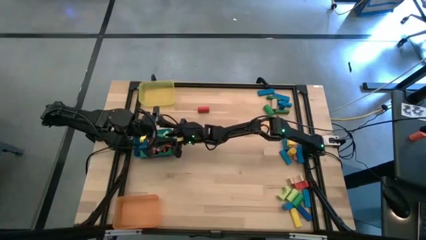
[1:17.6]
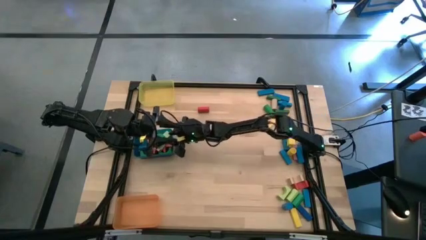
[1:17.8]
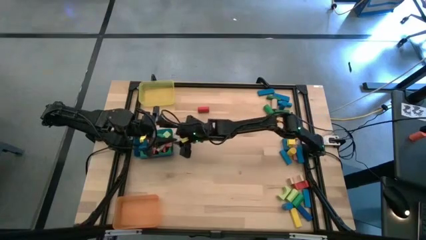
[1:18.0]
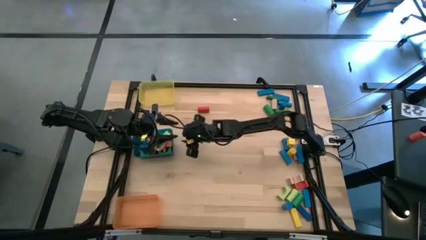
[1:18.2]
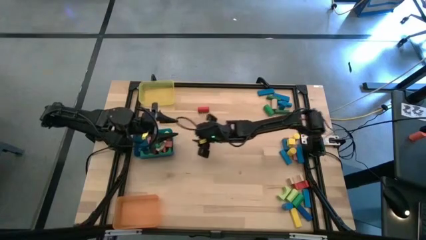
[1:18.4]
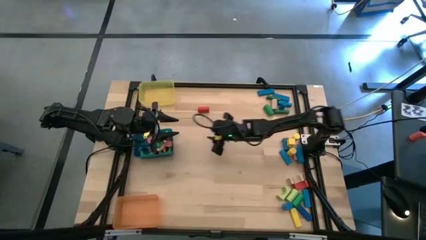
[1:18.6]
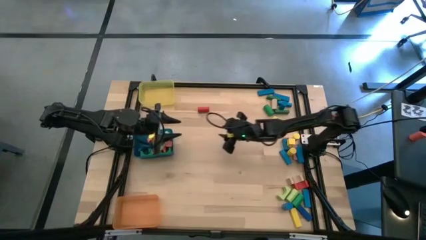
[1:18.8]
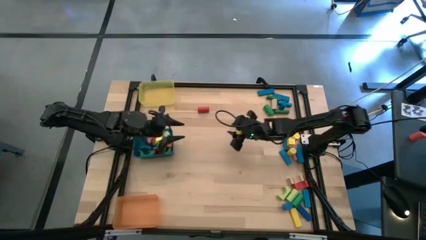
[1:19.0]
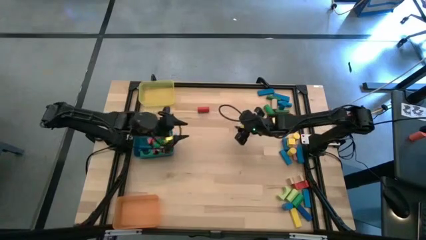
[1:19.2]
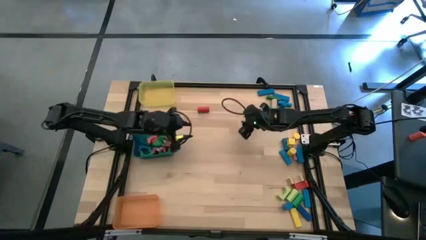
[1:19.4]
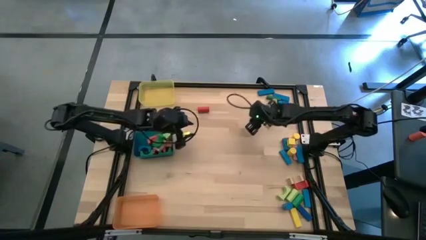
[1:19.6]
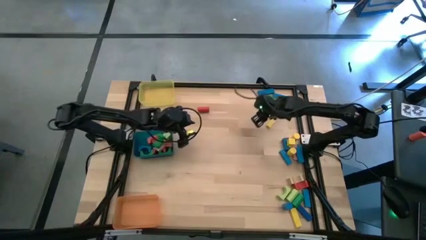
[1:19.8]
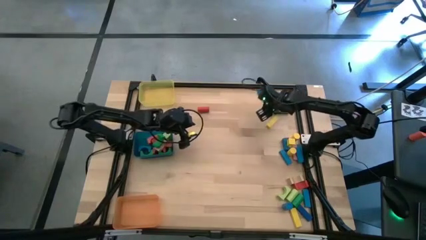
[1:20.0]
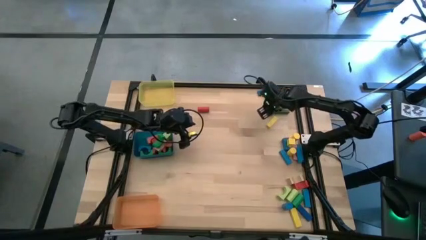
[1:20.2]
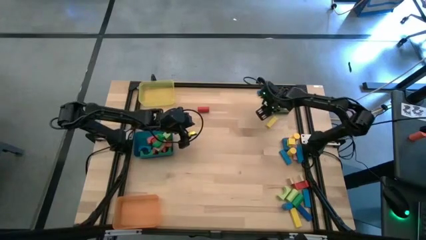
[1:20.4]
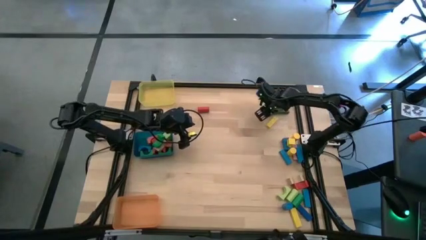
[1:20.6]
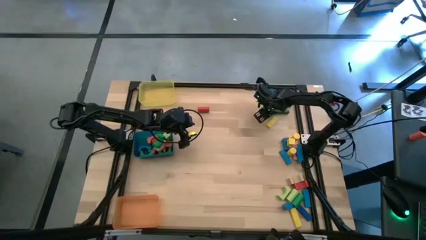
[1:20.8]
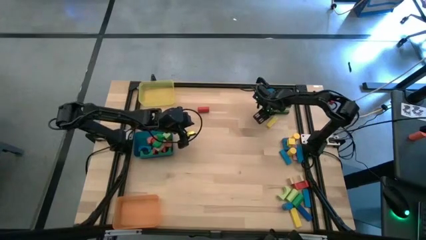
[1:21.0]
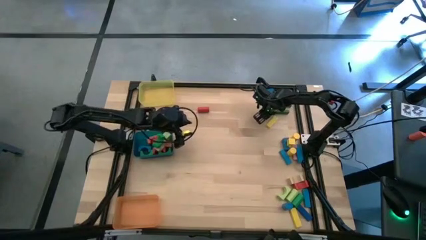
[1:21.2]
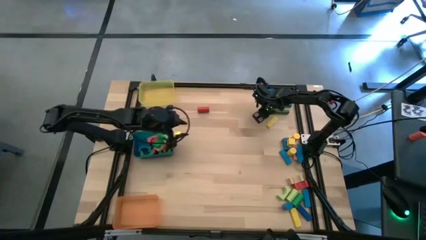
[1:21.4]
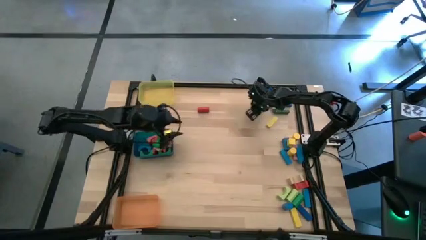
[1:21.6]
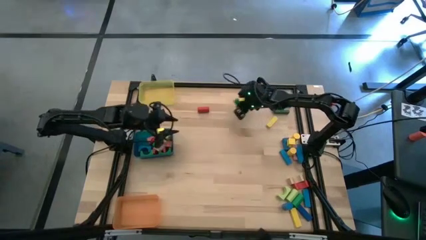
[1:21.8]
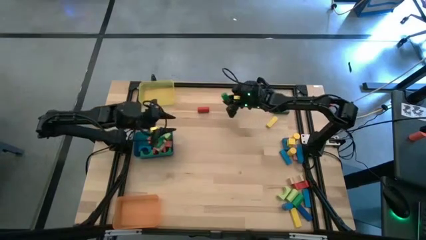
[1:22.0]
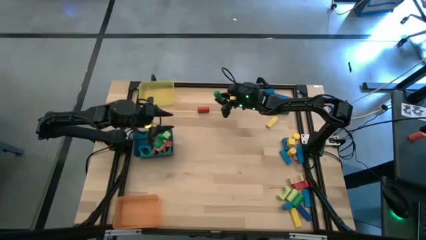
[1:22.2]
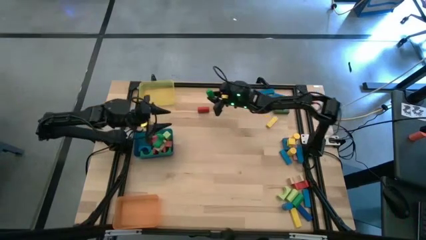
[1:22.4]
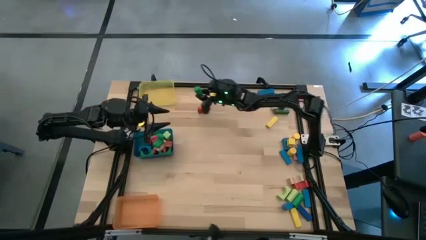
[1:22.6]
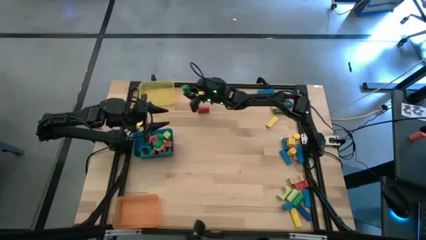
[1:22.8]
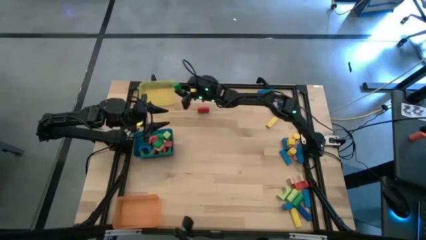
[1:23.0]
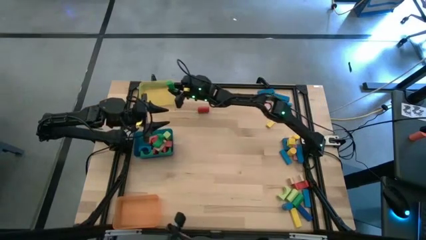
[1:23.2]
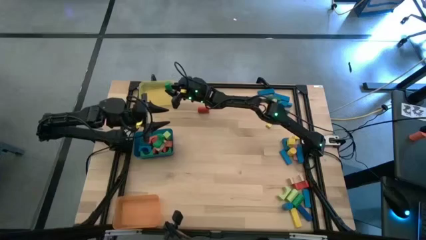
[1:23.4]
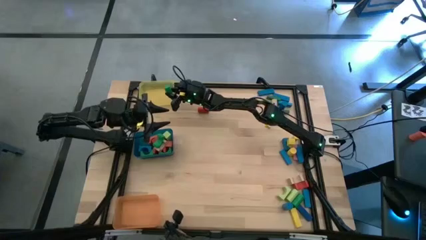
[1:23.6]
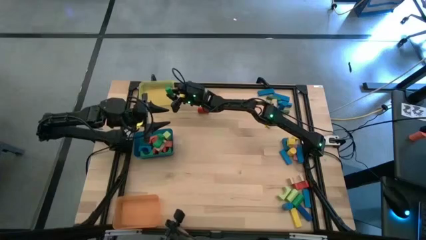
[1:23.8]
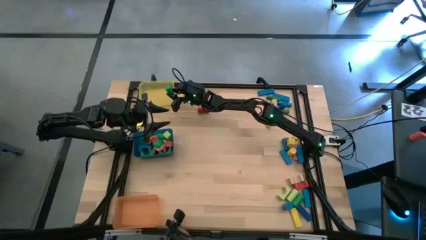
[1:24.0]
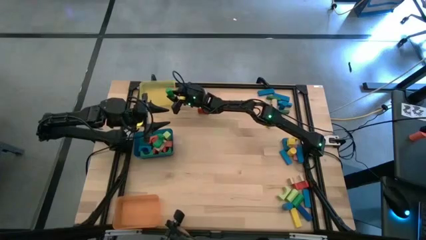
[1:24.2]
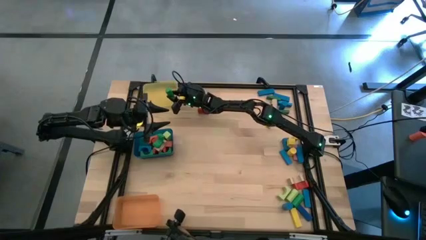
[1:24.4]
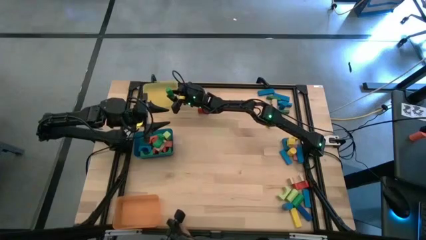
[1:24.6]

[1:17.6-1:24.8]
Task: Sort blocks by size
Put the green cylindrical block into the yellow bin

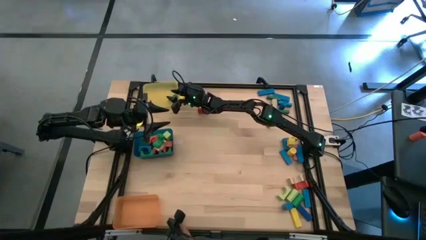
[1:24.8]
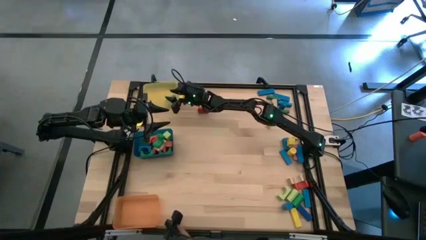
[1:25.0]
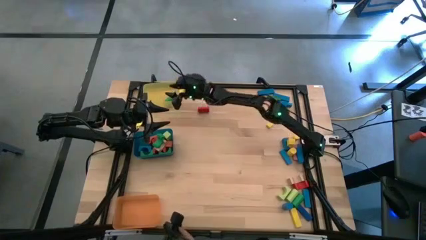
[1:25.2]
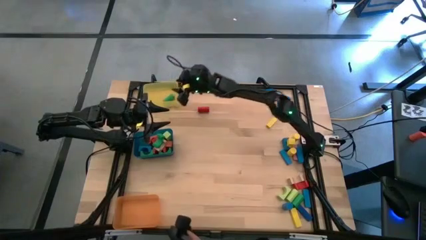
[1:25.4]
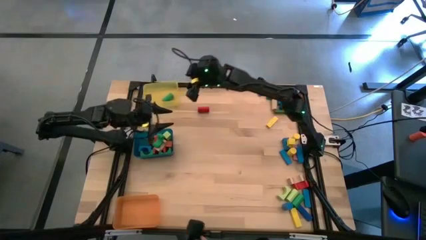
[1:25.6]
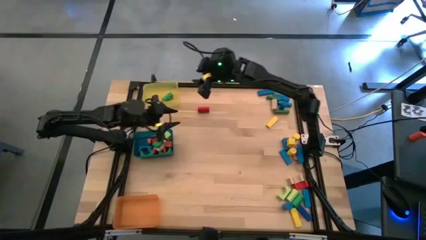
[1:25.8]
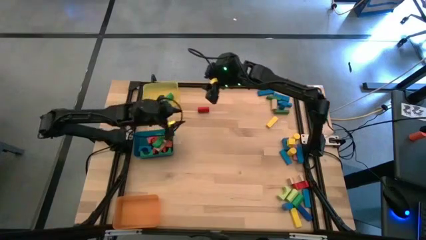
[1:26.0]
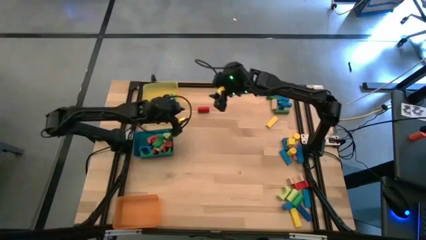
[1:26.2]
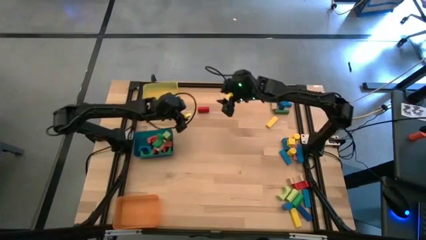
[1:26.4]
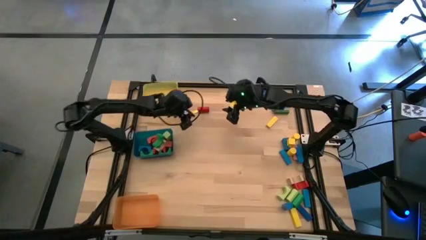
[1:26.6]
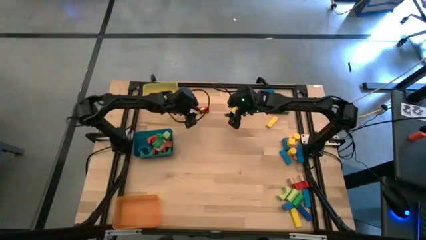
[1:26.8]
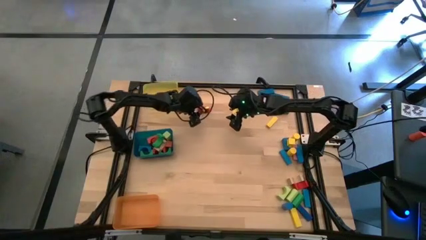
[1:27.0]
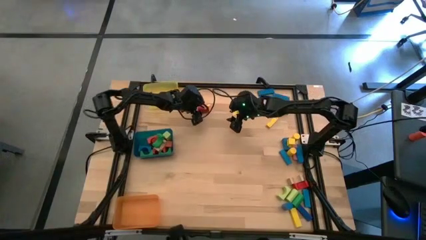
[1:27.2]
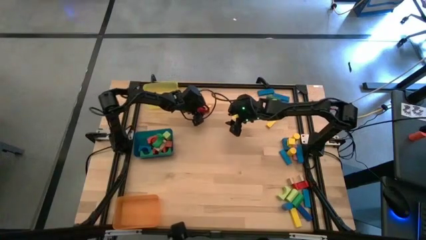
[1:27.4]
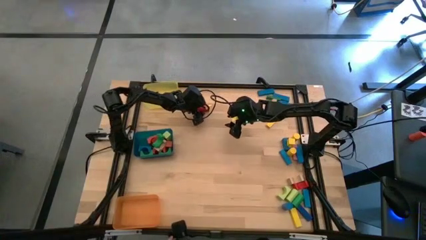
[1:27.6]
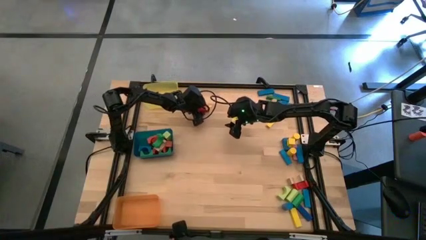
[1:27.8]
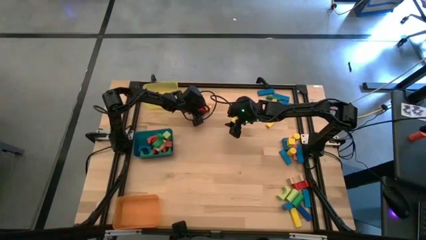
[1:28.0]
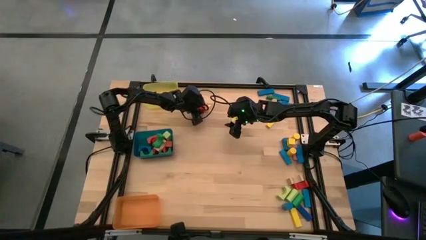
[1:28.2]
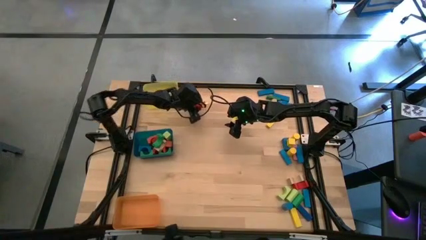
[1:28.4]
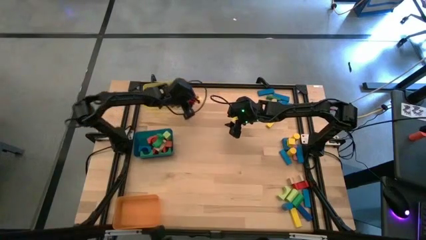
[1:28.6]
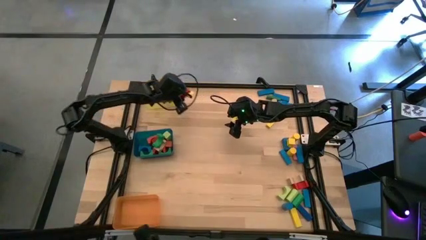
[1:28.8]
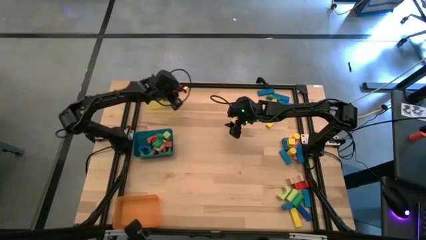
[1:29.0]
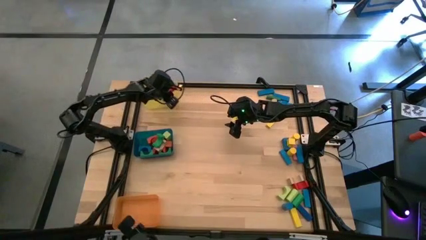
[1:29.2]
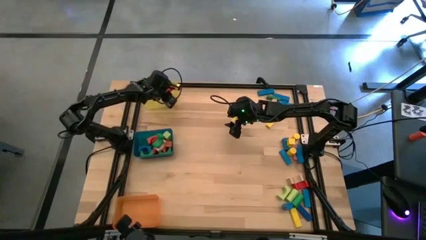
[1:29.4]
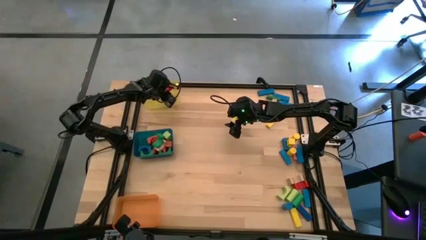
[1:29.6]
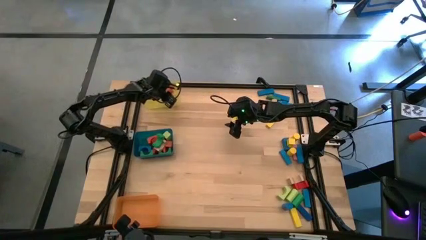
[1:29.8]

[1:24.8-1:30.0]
Put the red cylindrical block into the yellow bin

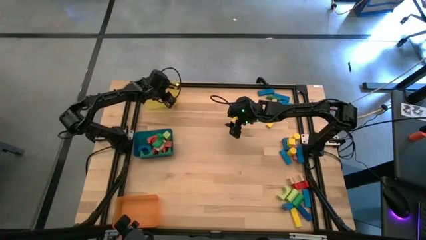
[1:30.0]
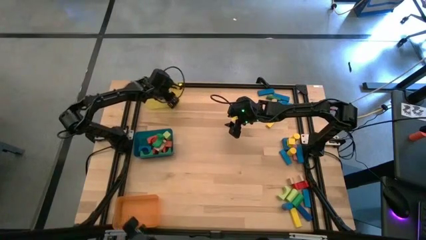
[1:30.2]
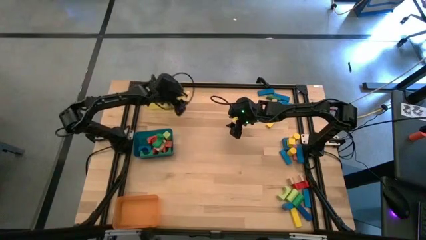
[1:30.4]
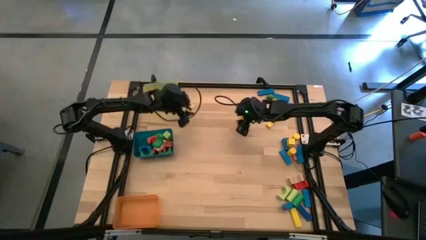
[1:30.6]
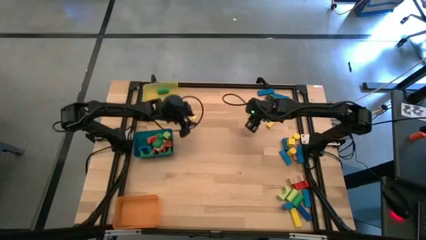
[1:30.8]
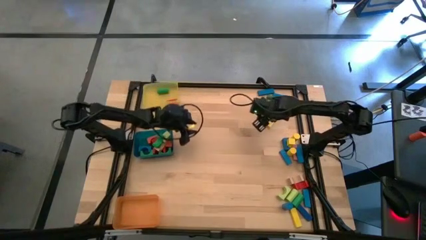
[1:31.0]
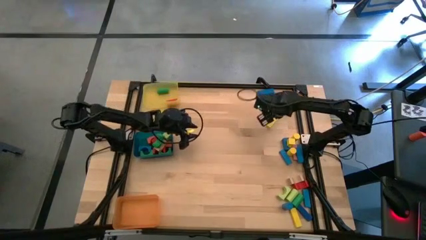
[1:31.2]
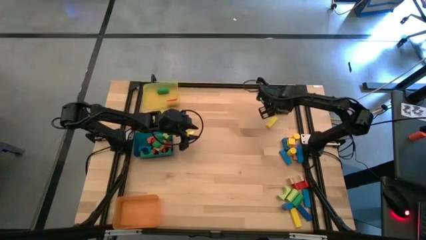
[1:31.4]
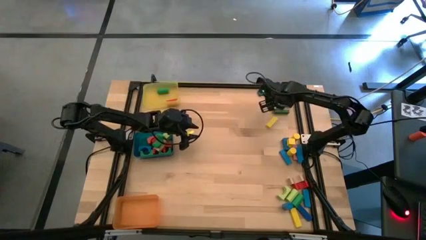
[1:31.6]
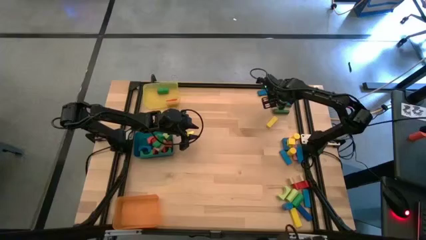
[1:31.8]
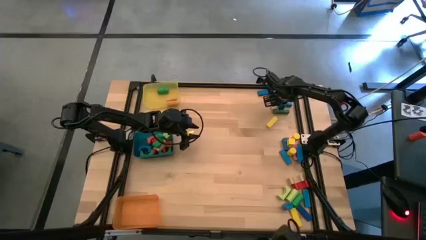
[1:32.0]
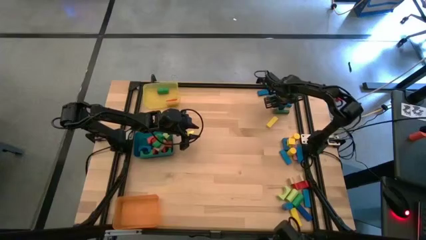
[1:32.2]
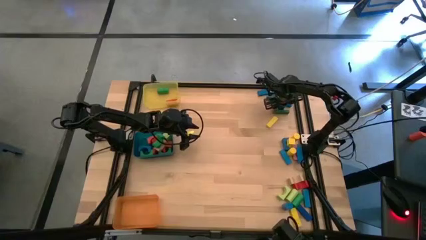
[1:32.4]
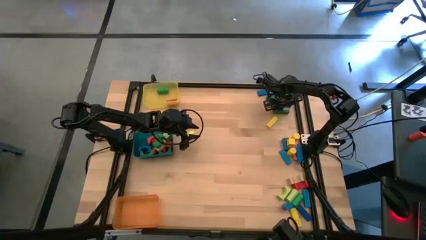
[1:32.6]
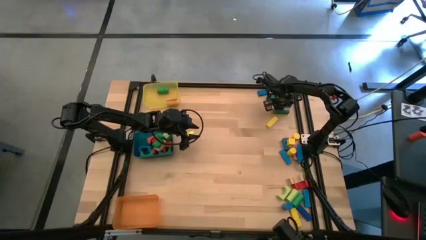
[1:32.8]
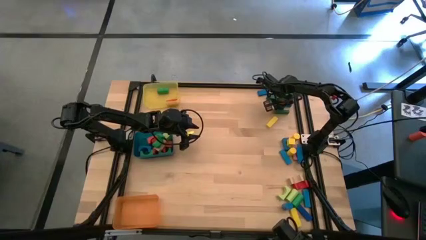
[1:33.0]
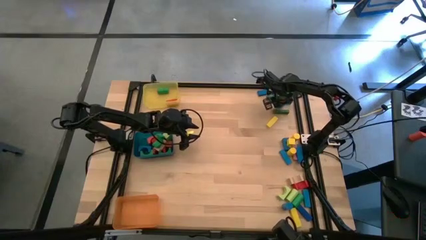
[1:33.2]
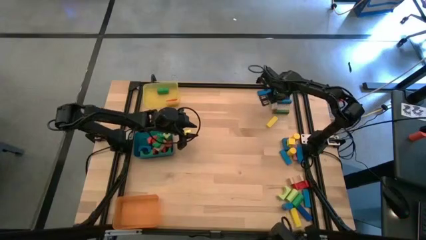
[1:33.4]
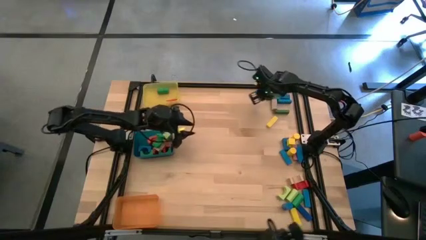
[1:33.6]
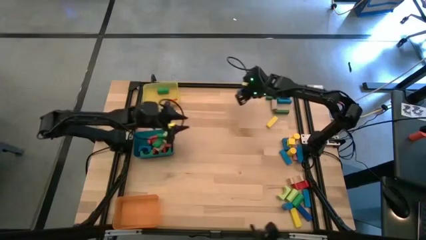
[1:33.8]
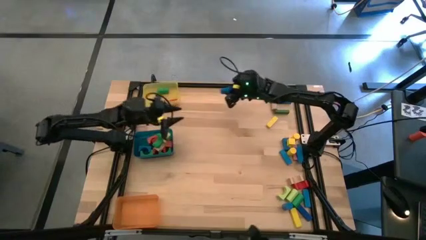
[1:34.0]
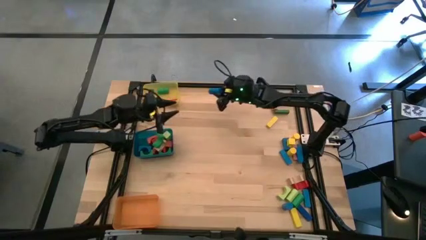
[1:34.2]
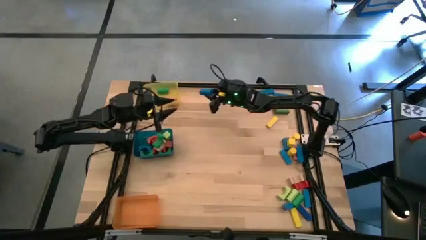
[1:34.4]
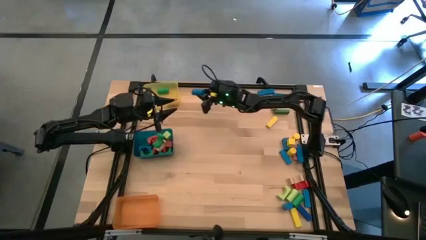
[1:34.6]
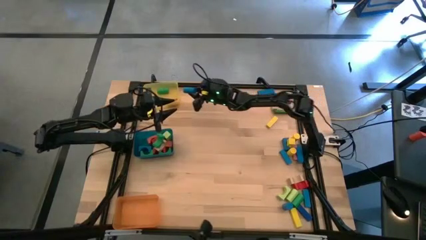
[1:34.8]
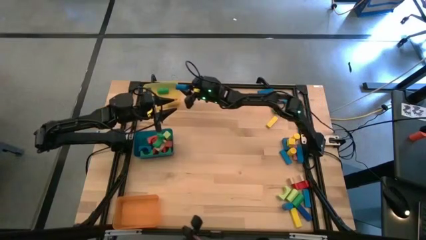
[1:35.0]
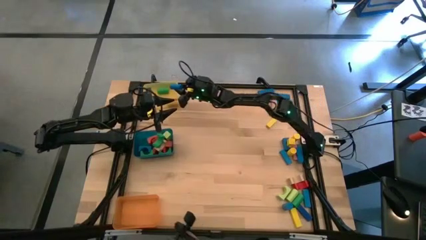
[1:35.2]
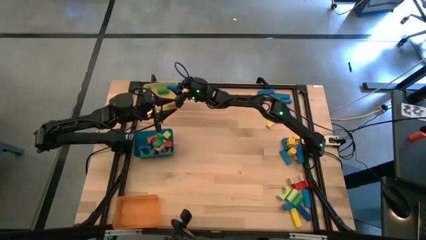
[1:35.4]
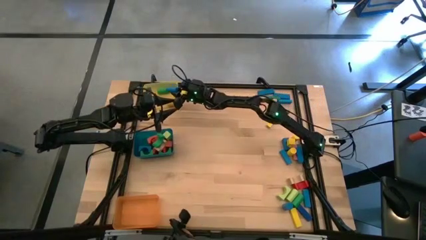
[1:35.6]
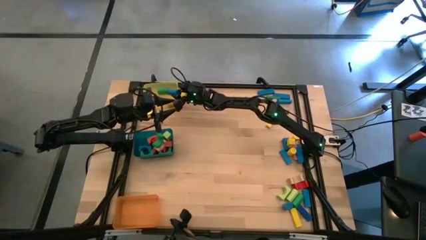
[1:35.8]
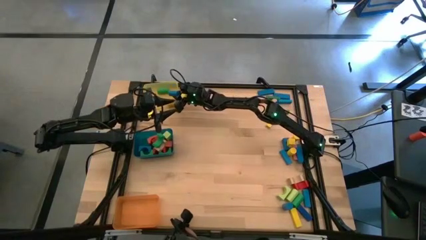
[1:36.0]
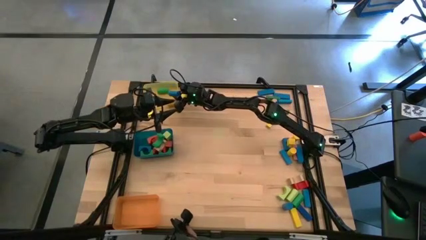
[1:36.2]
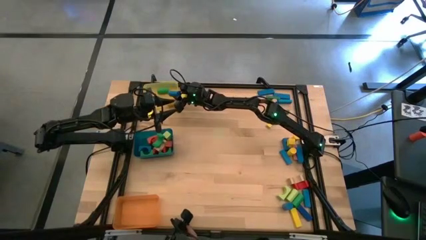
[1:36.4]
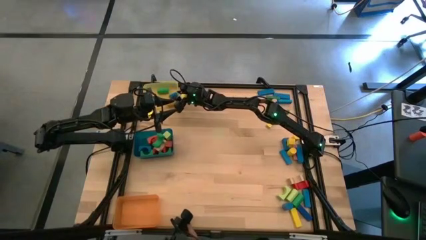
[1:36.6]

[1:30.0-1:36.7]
Put the blue cylindrical block into the yellow bin
